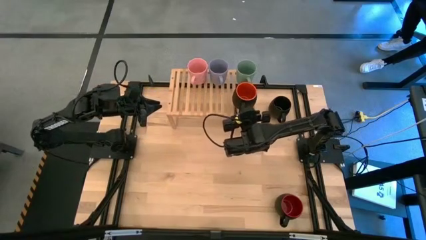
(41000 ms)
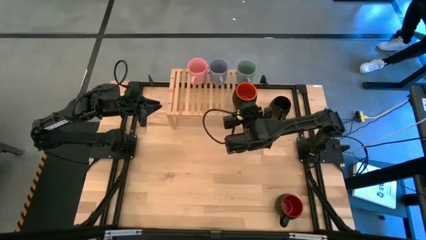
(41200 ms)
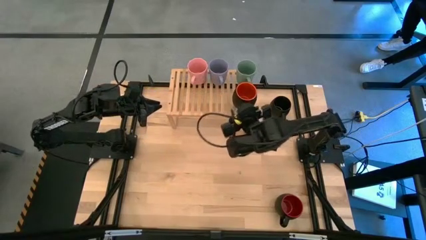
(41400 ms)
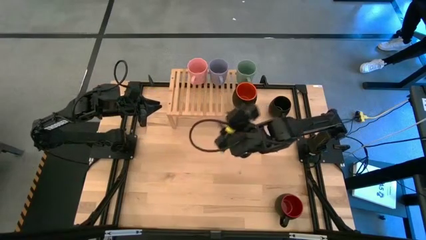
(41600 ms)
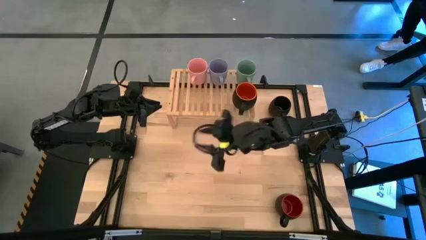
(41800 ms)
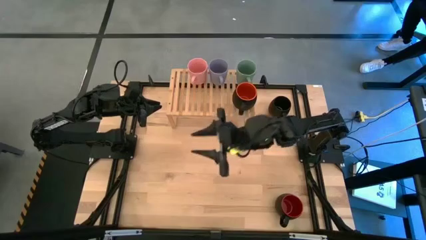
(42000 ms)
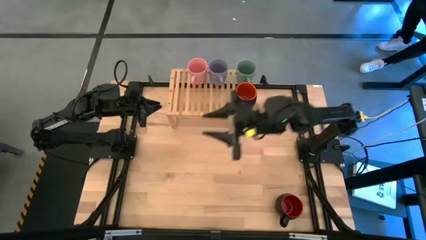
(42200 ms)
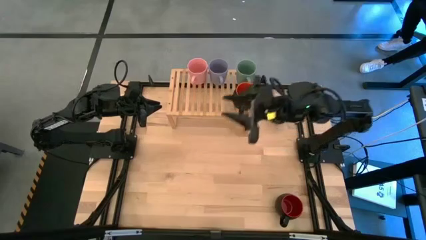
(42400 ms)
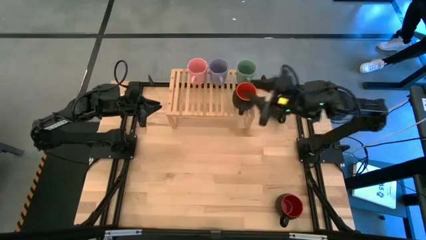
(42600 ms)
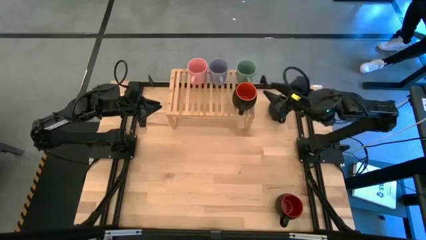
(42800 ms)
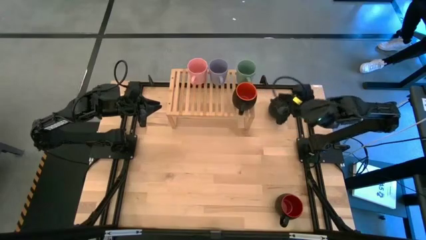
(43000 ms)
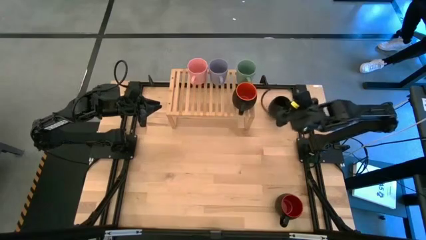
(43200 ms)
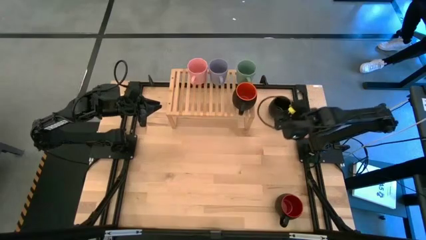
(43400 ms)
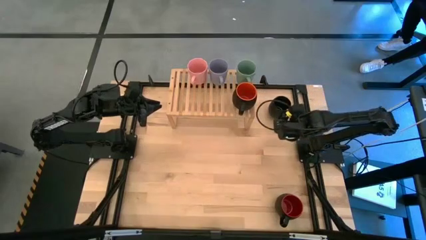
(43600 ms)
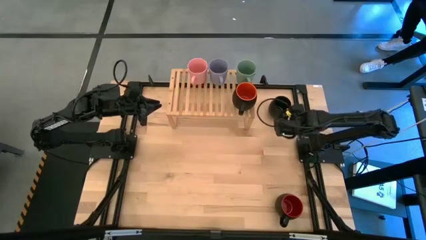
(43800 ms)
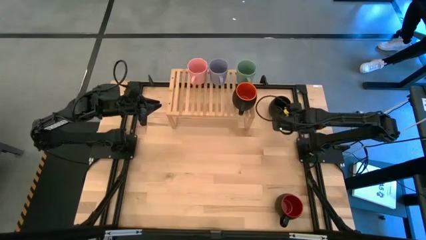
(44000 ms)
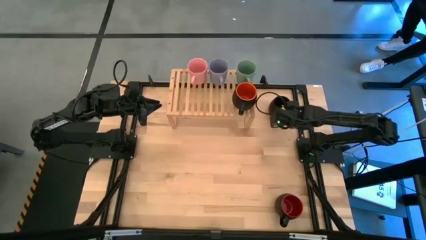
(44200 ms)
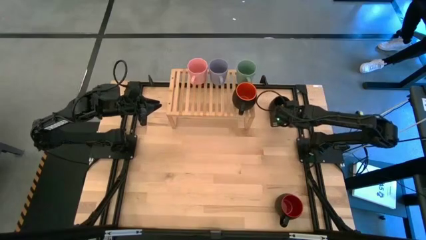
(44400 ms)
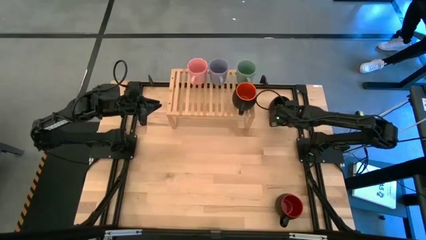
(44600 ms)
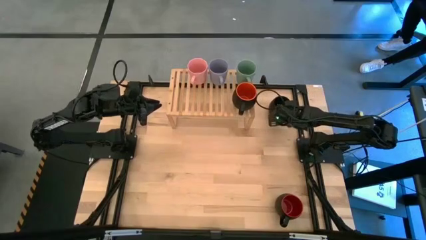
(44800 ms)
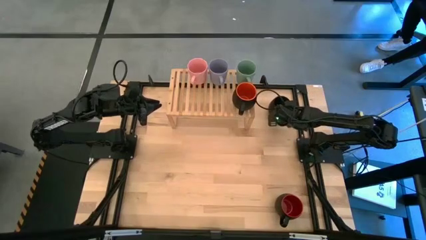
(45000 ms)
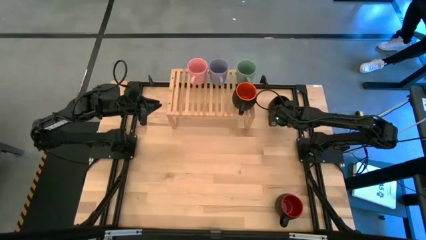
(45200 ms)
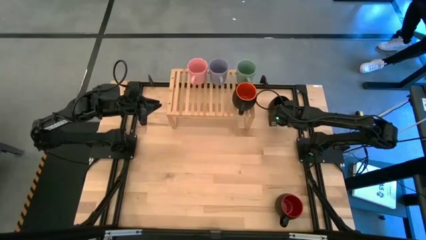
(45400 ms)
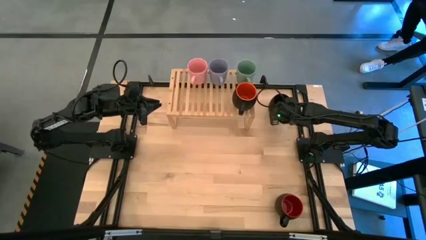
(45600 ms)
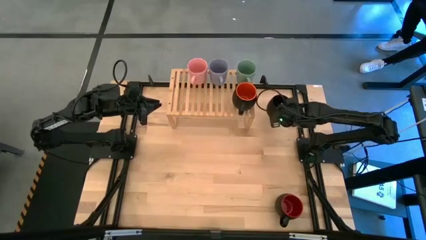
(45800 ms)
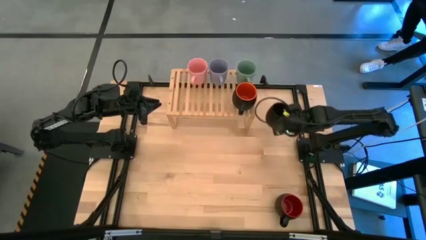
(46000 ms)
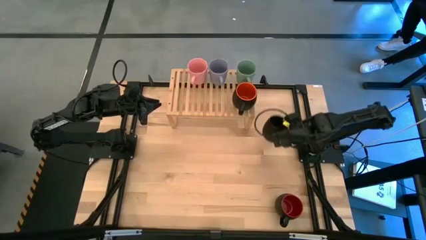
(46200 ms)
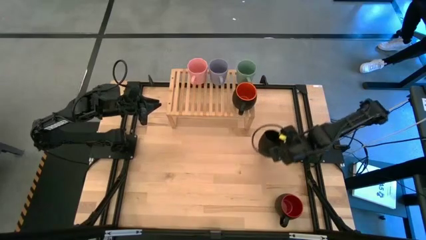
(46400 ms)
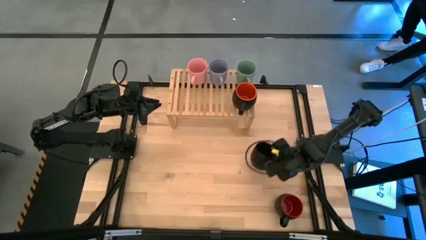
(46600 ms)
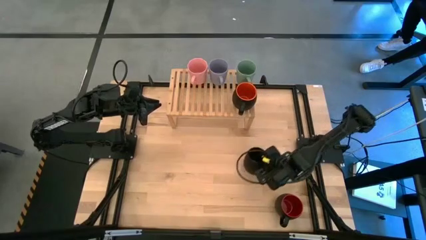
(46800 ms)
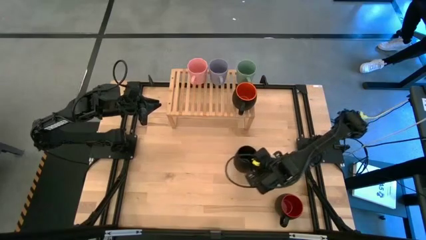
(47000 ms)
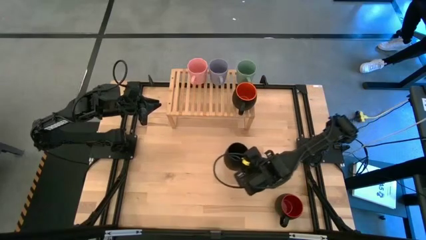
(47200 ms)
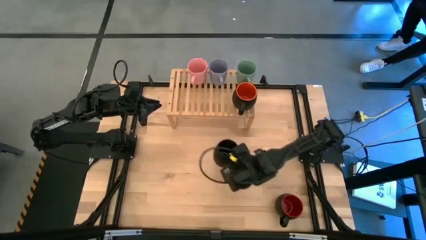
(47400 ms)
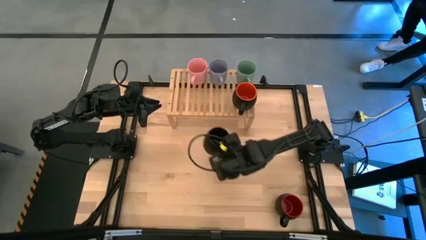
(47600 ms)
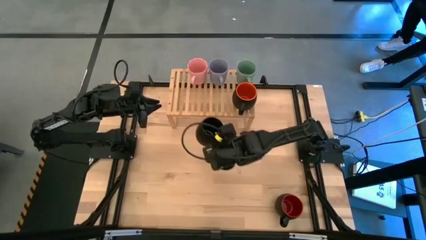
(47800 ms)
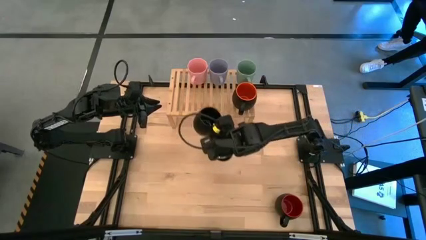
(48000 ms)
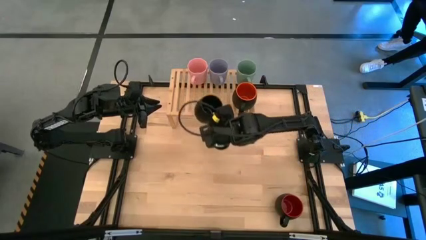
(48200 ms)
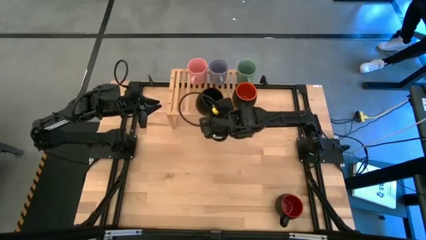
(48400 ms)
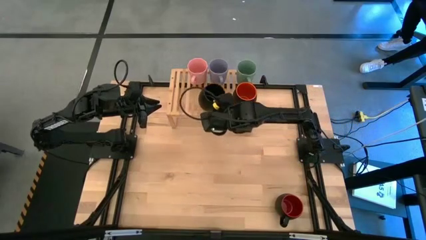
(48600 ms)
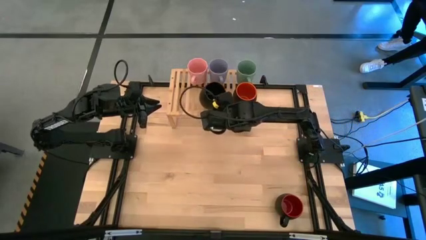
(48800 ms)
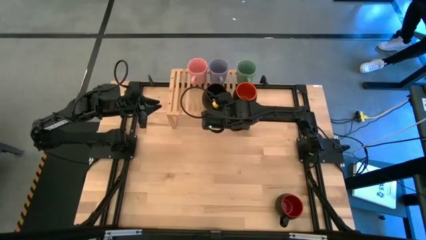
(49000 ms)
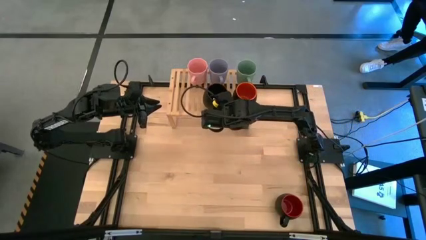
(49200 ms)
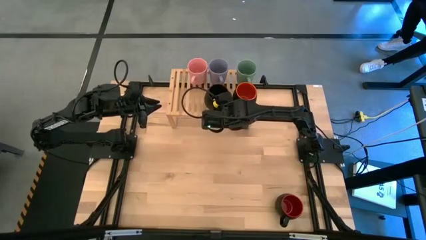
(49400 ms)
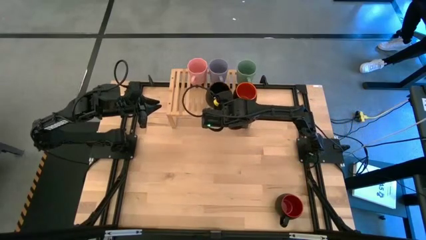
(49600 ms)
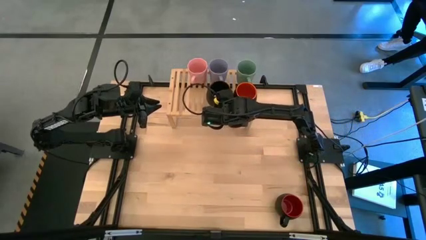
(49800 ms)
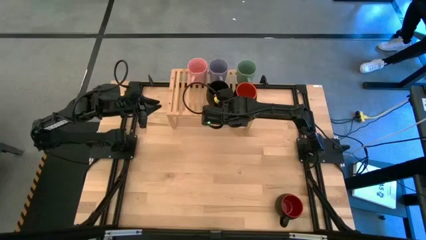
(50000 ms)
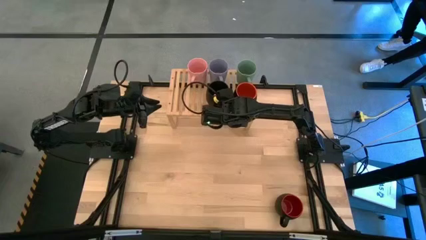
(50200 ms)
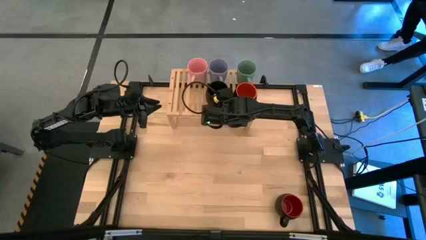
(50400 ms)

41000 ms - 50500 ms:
Task: Place coffee mugs
Put the black mug on the shelf

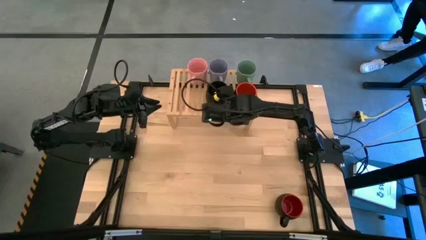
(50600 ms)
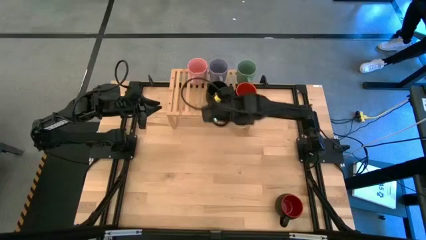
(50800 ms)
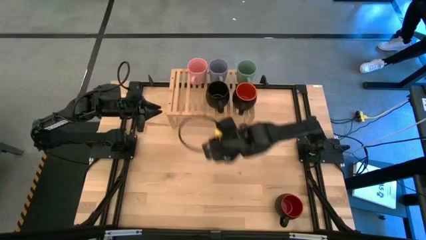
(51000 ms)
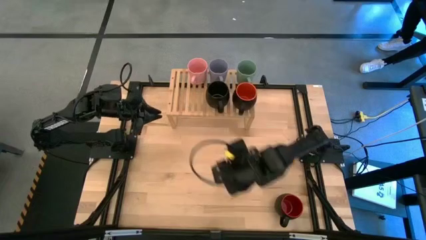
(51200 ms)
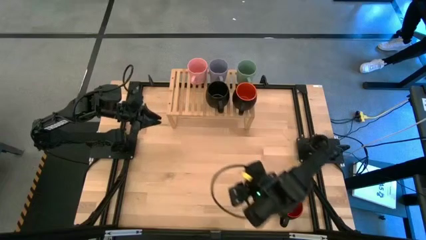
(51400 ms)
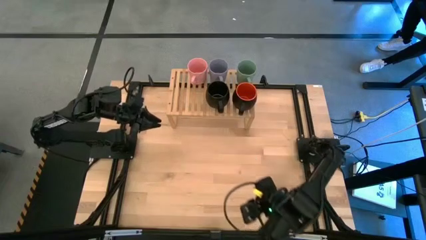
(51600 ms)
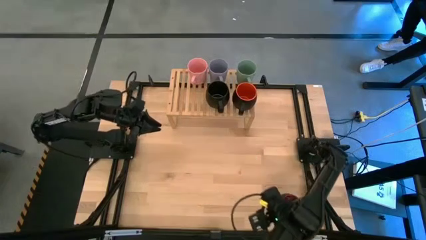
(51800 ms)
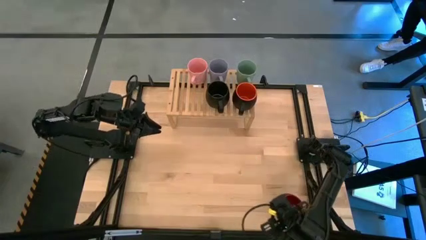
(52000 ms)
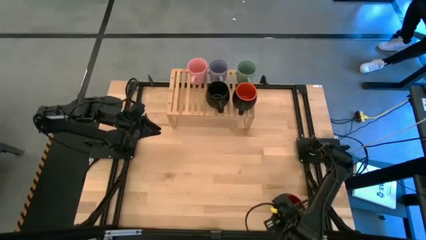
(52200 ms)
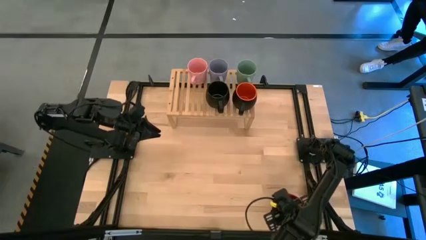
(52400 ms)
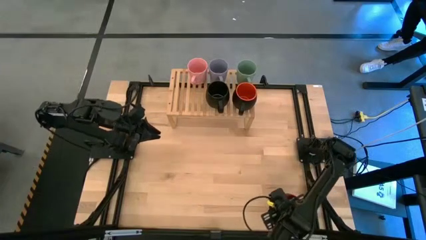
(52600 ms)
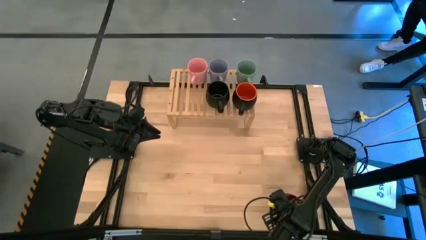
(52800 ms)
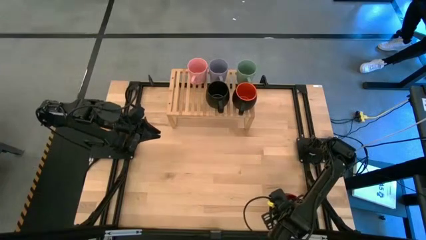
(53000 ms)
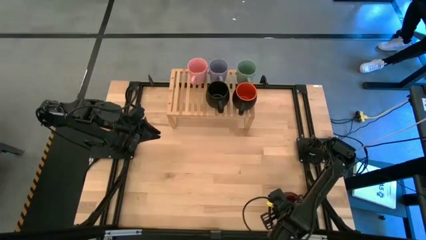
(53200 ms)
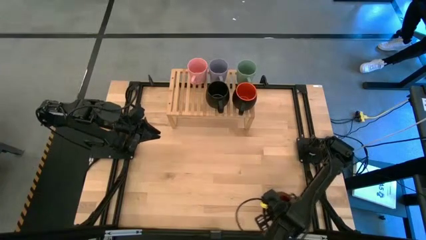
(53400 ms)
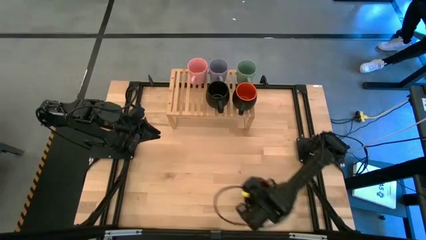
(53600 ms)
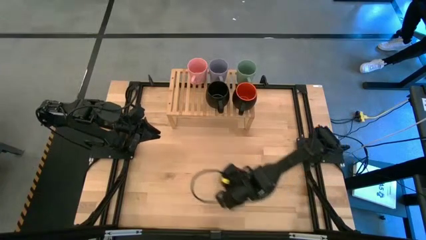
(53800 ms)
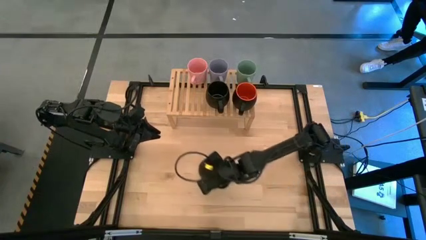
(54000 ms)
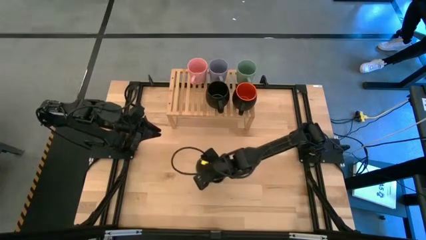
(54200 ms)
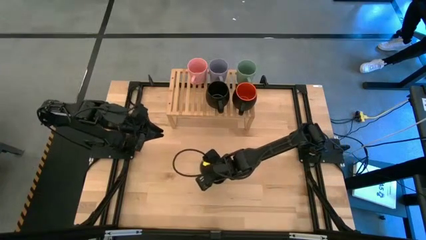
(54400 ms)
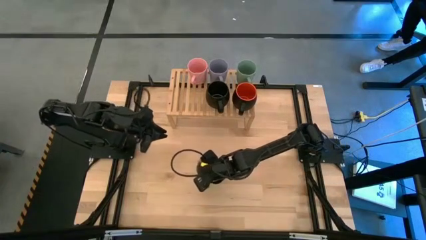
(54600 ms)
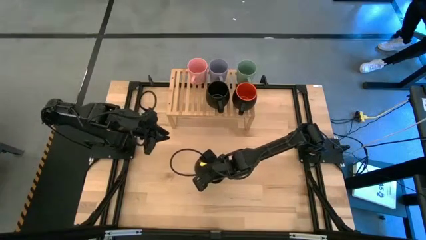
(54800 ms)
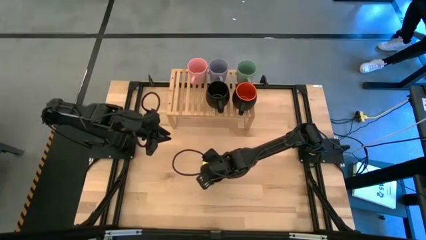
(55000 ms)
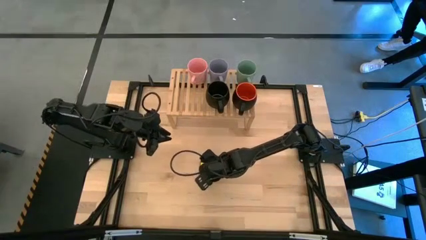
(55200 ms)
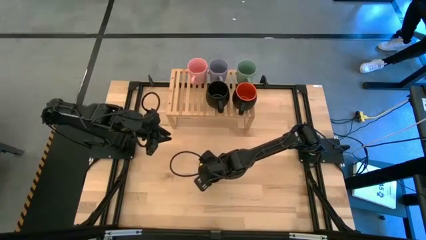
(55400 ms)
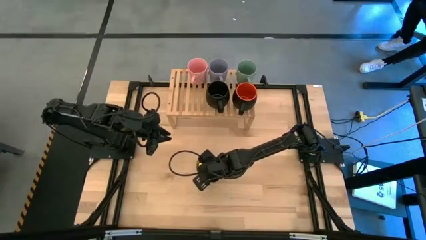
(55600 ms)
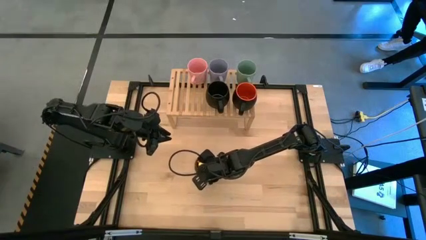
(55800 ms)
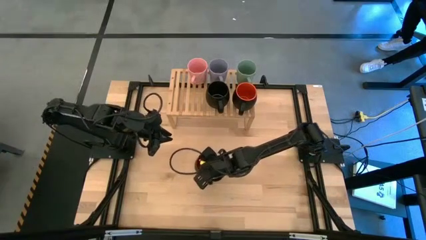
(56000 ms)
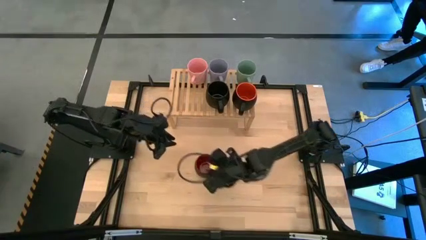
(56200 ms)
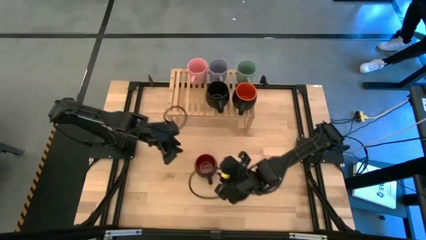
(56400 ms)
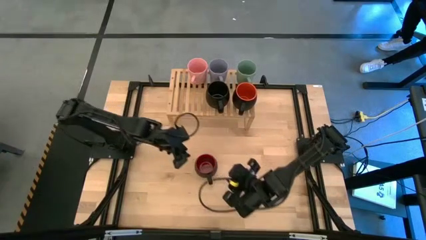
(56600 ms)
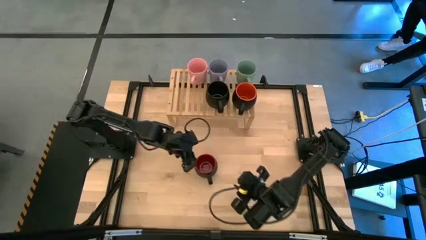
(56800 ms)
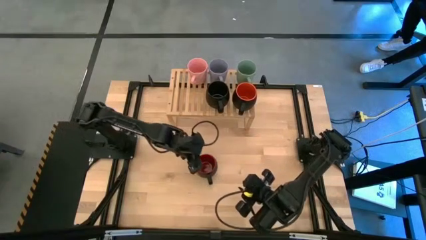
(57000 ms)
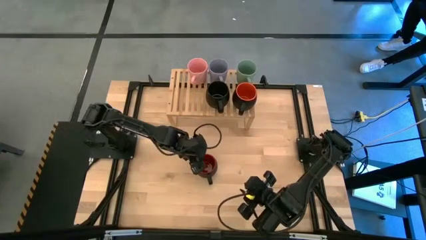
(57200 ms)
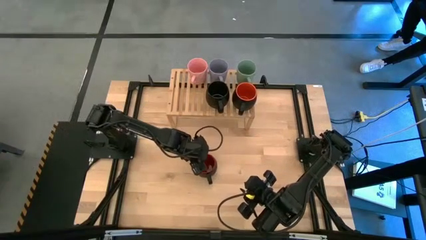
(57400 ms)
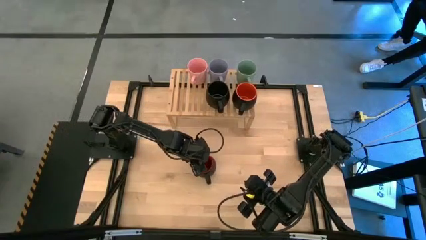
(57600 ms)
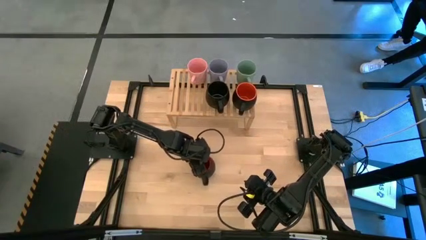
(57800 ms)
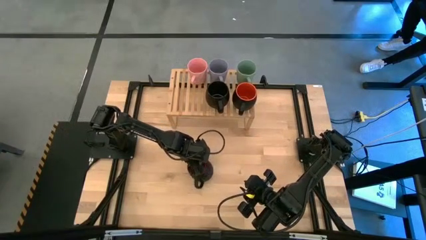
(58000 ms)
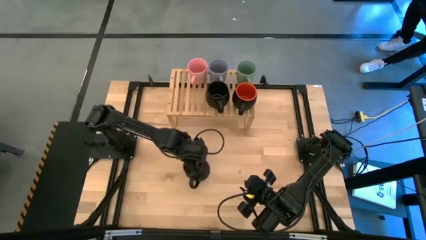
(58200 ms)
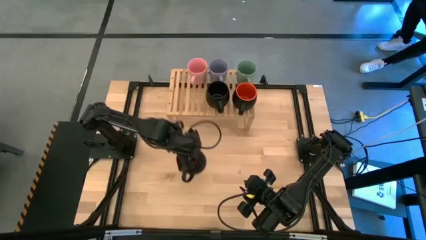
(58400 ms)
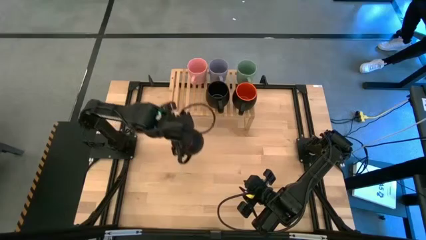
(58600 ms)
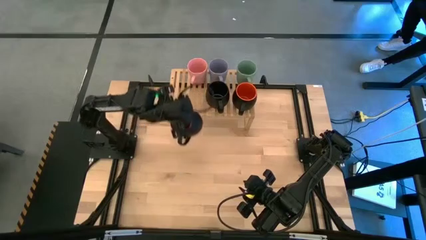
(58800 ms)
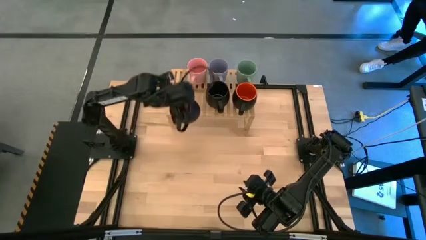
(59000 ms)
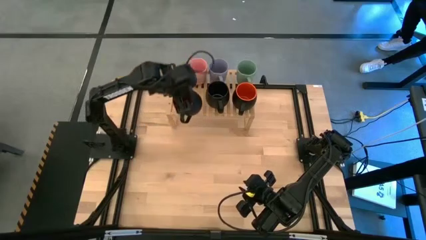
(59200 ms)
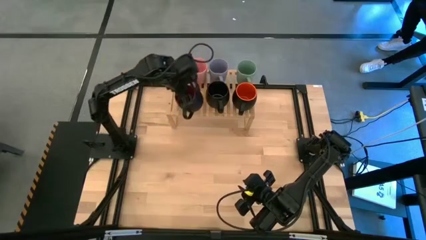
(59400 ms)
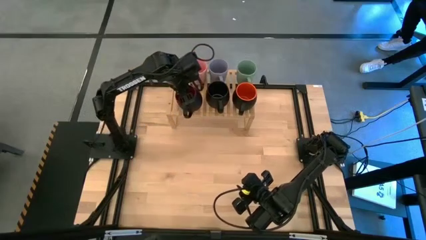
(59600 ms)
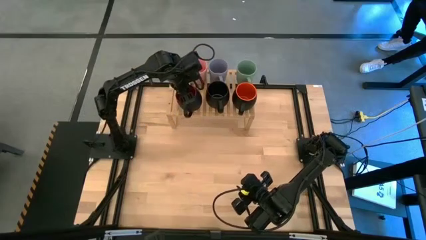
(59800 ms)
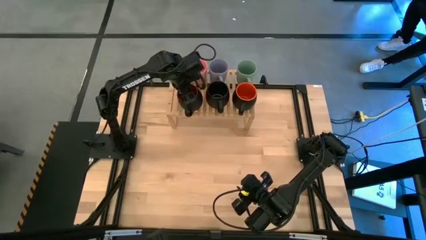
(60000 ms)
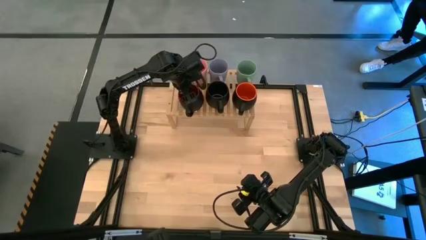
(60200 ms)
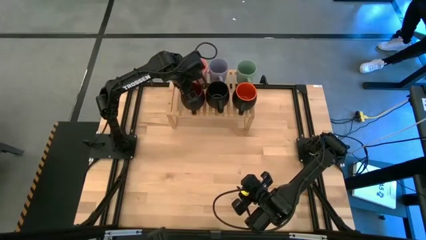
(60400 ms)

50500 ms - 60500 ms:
Put the black red mug on the shelf
